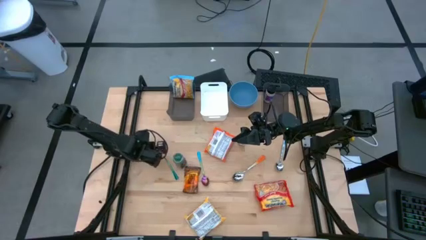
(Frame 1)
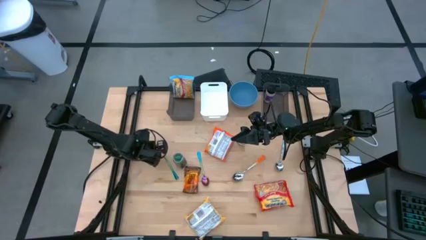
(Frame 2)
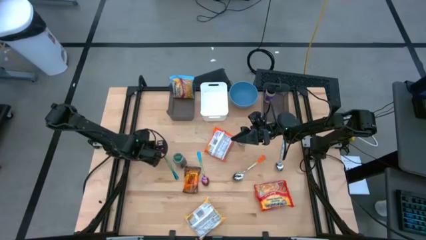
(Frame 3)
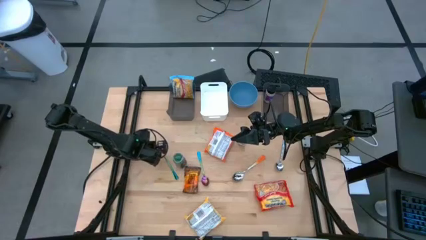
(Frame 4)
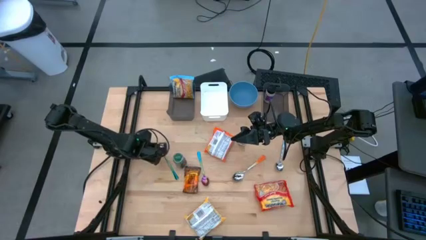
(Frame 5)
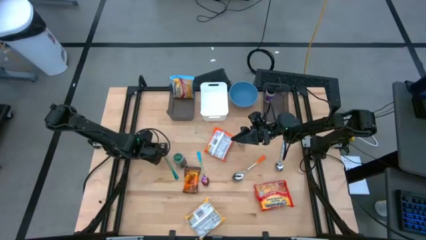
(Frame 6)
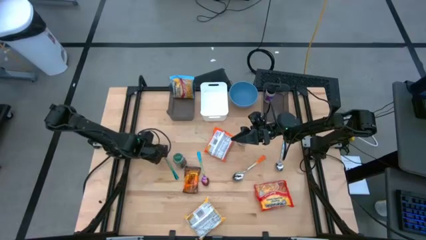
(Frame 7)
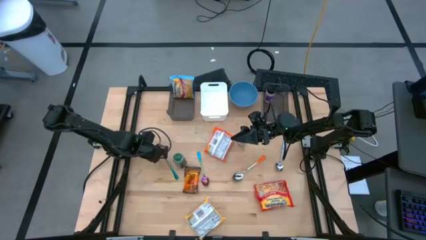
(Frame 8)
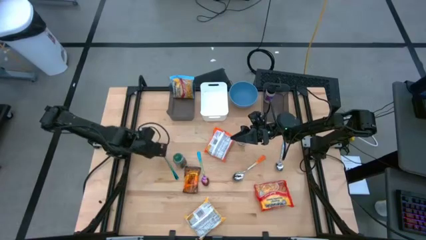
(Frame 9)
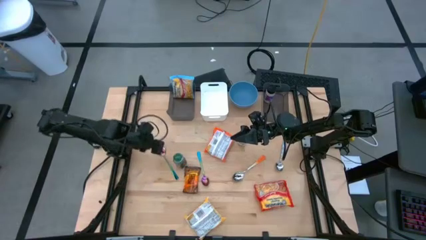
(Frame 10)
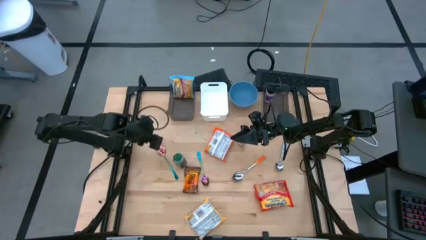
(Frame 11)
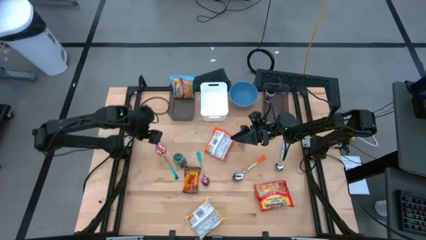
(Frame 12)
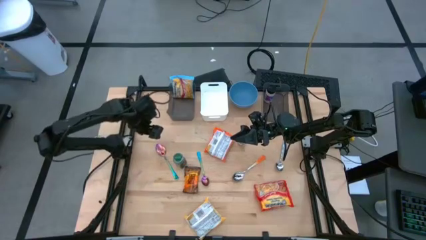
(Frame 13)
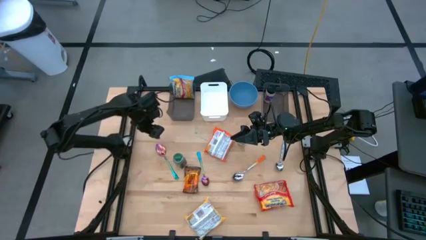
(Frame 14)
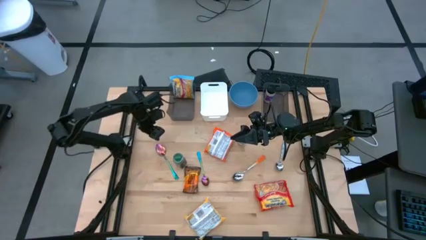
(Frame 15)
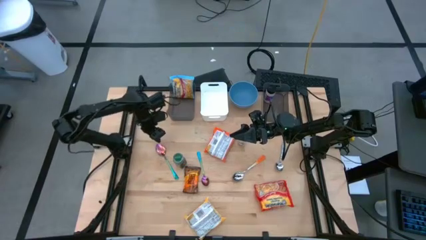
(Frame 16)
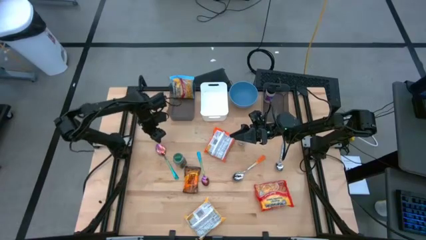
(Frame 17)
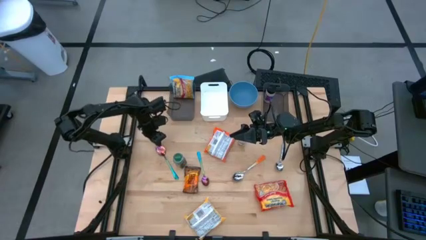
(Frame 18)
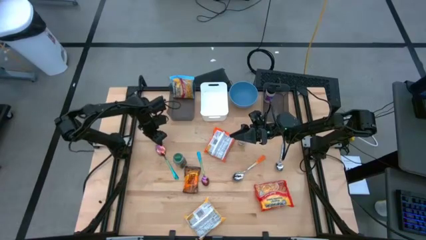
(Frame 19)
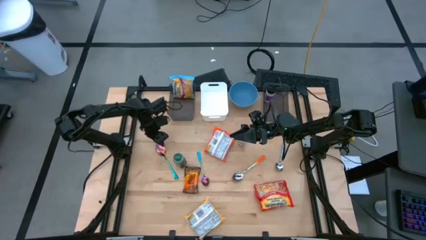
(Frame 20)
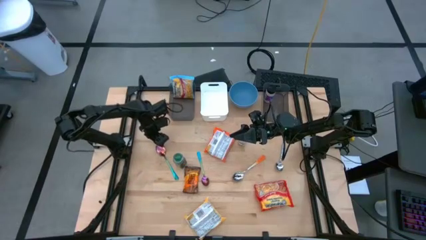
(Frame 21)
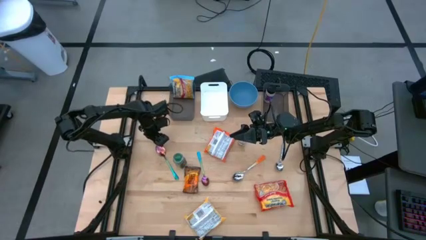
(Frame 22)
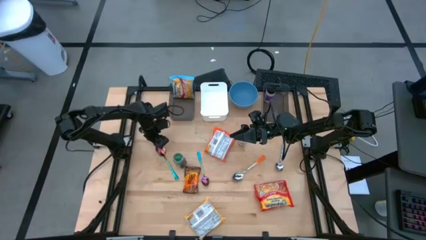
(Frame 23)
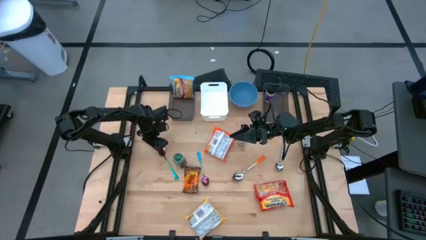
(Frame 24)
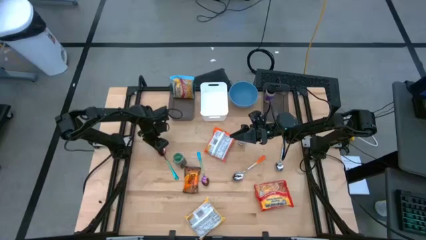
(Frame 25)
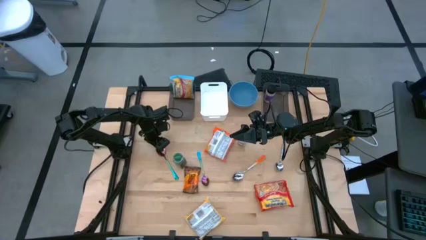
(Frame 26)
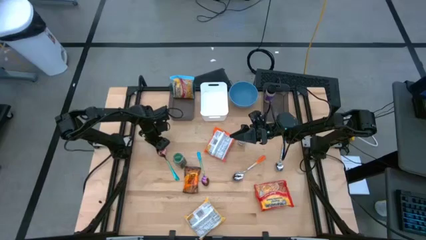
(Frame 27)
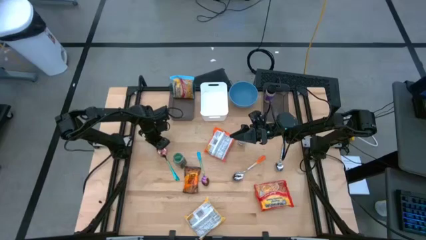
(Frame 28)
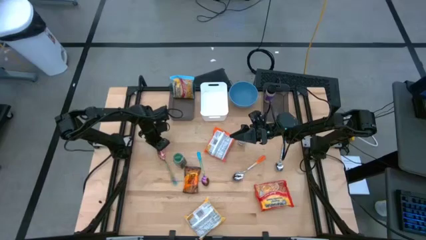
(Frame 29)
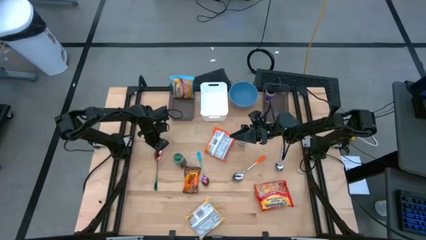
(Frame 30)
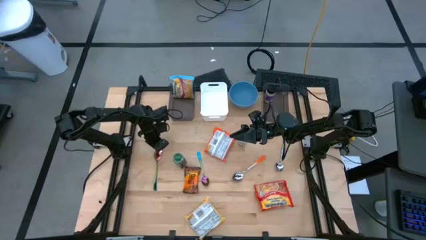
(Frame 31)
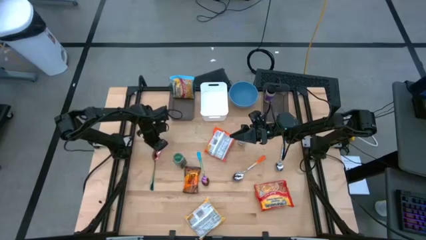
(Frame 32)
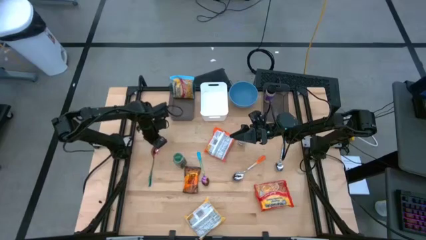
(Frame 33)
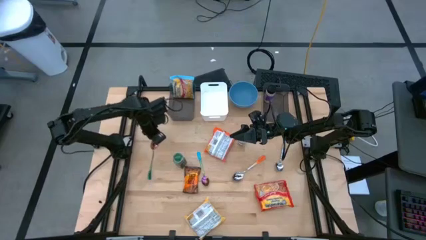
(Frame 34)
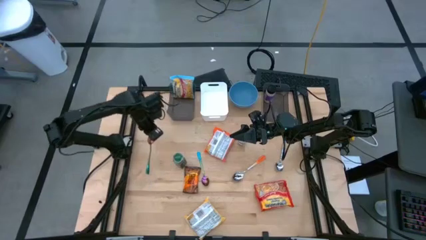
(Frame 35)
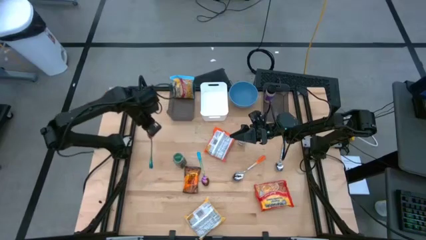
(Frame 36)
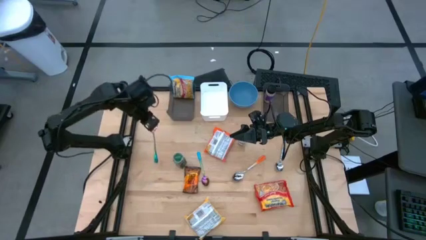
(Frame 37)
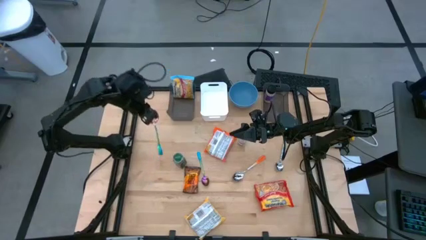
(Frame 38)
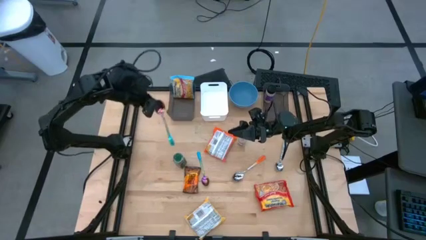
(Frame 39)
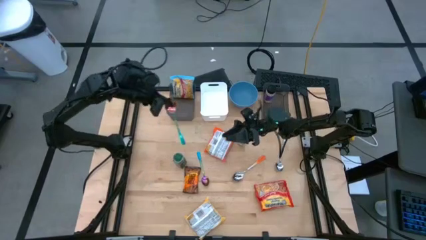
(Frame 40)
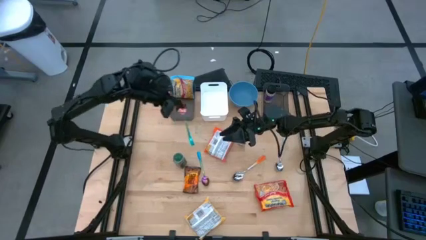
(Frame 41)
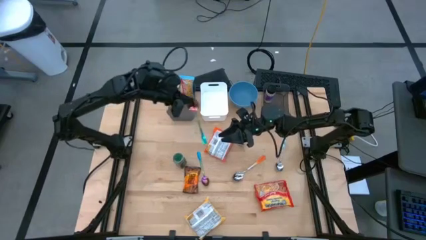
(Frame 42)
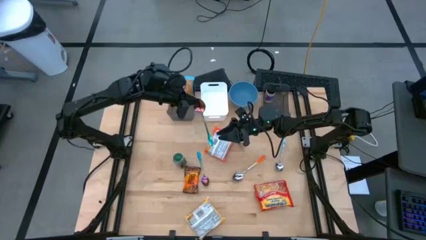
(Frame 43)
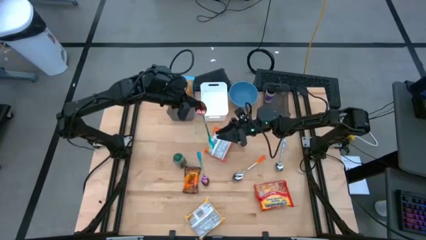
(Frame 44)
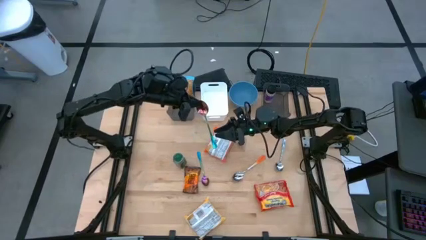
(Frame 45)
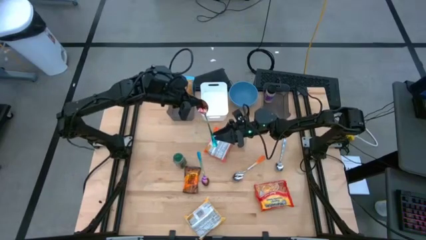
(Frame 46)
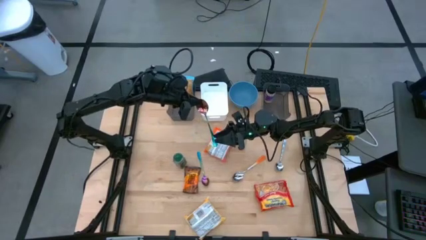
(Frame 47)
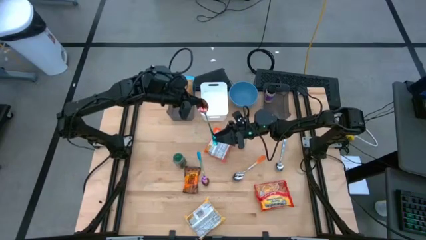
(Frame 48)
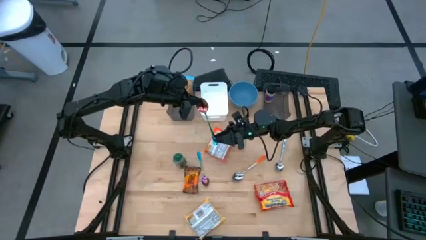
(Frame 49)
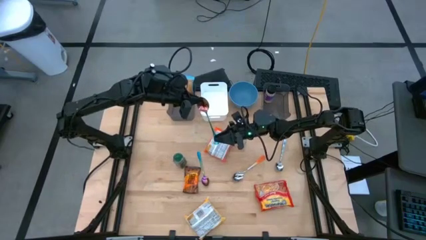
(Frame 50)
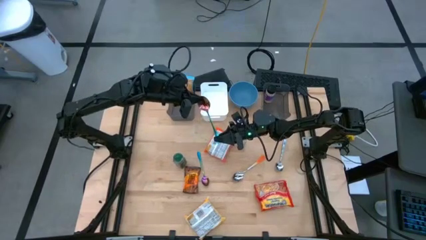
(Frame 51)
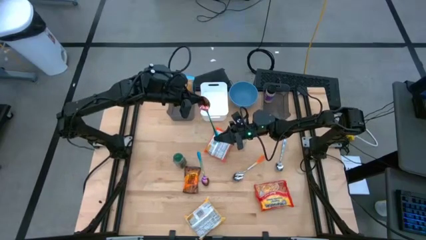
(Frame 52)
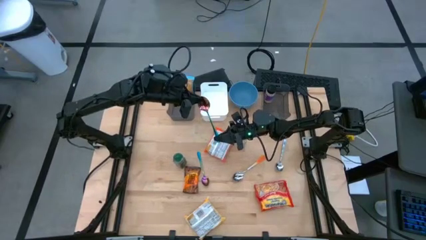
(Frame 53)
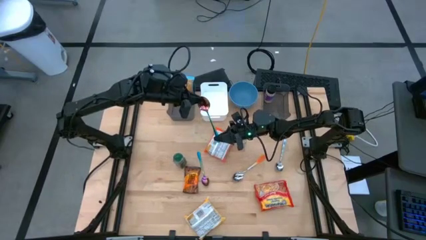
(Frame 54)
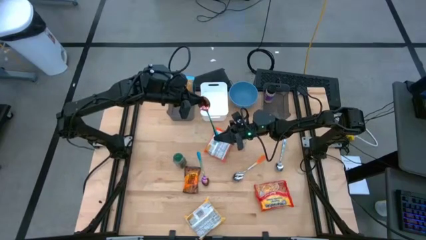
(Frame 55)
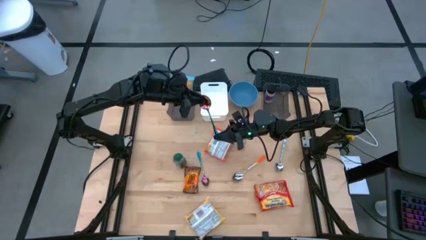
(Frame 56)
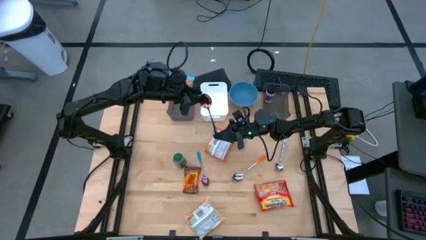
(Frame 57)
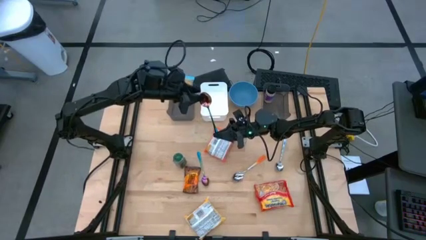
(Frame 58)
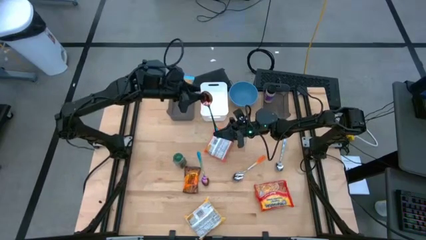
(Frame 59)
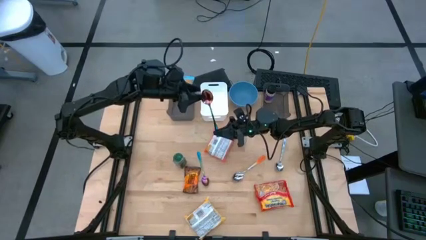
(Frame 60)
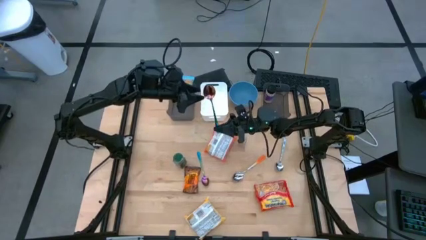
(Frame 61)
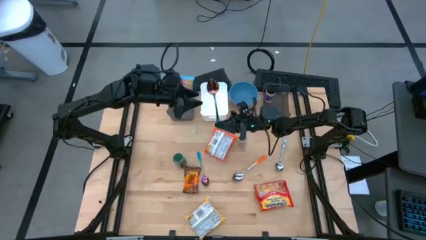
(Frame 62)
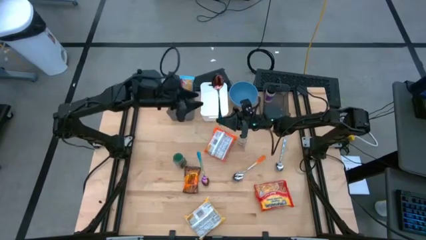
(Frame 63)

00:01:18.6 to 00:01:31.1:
Task: Pick & Place Food Item
Put the left blue spoon into the white bin

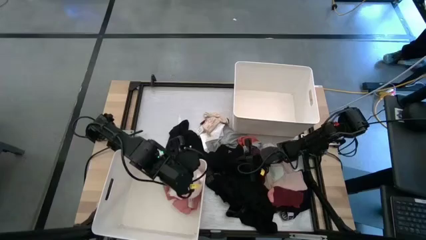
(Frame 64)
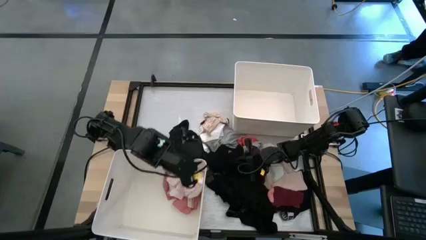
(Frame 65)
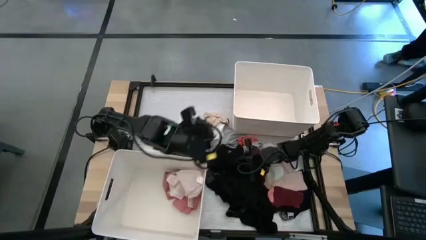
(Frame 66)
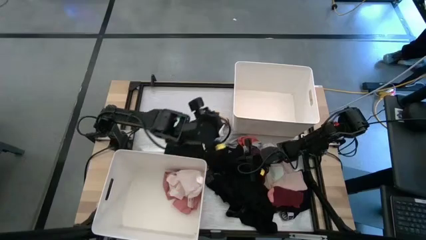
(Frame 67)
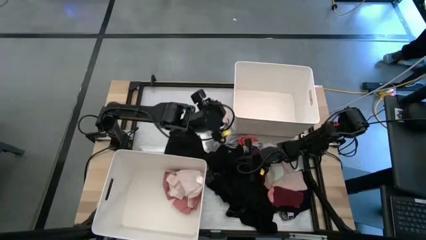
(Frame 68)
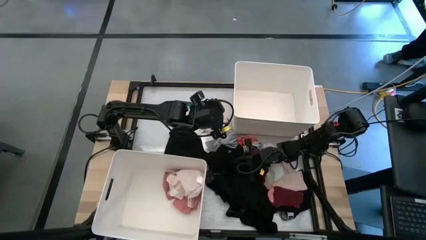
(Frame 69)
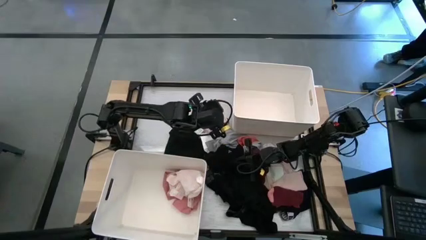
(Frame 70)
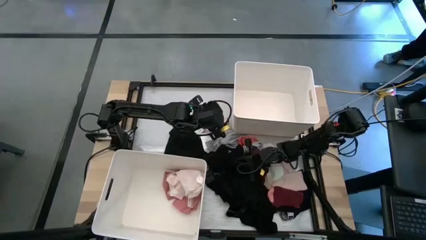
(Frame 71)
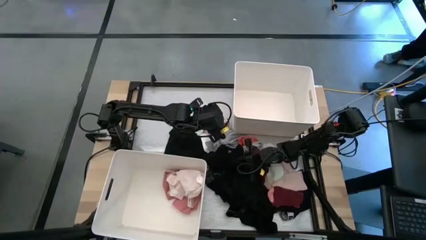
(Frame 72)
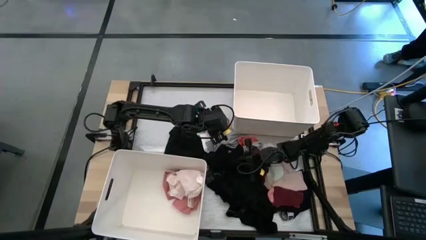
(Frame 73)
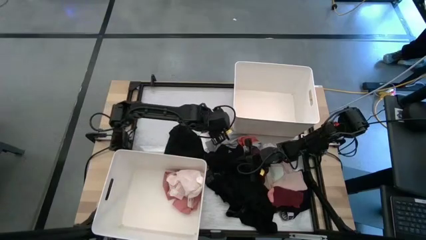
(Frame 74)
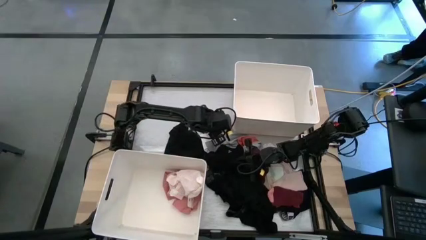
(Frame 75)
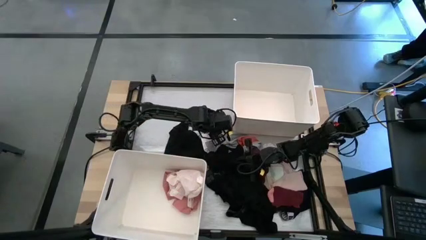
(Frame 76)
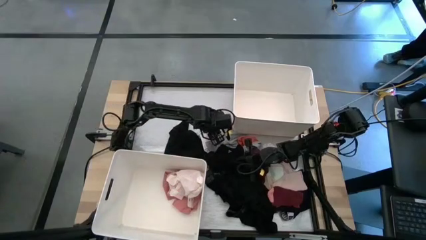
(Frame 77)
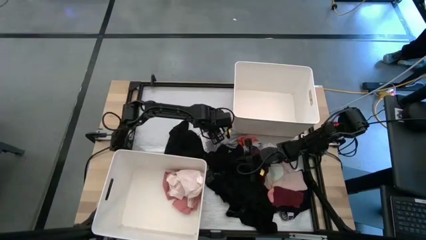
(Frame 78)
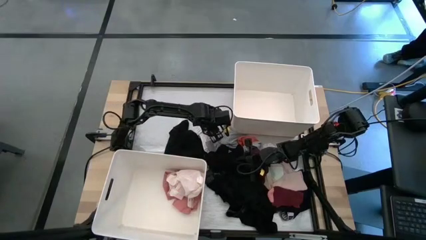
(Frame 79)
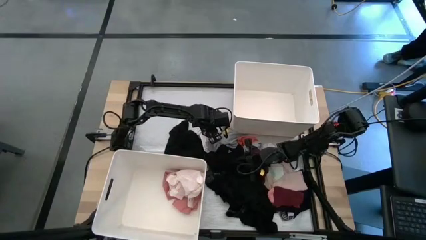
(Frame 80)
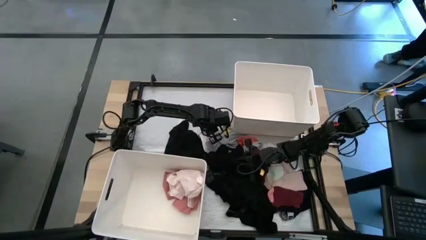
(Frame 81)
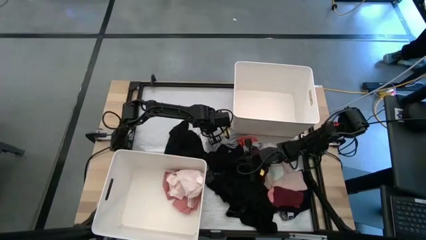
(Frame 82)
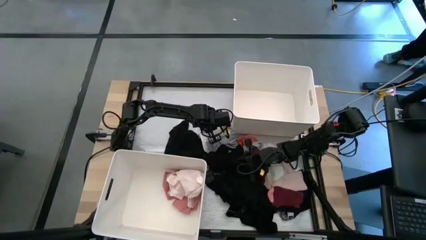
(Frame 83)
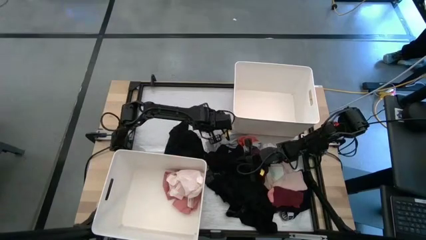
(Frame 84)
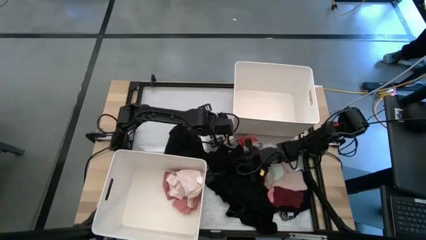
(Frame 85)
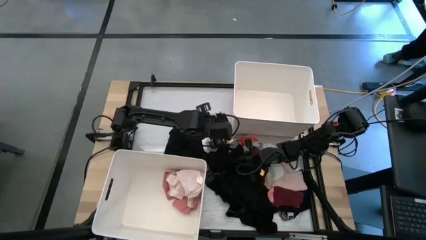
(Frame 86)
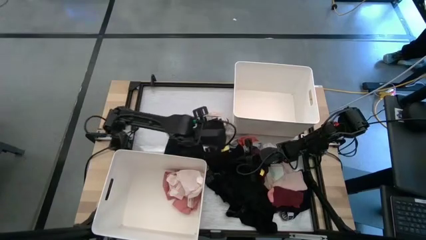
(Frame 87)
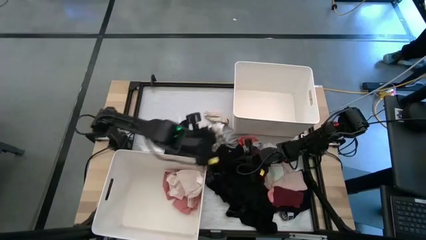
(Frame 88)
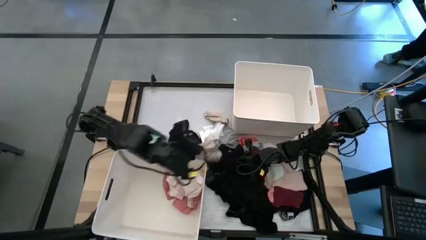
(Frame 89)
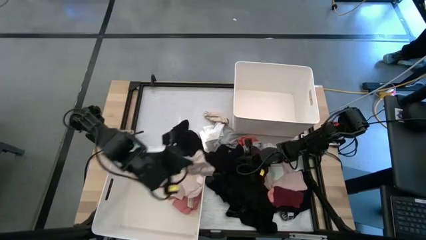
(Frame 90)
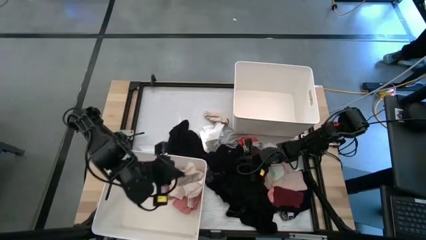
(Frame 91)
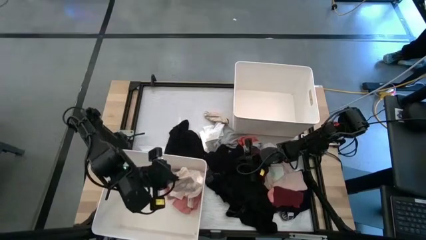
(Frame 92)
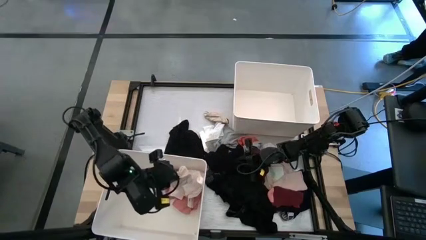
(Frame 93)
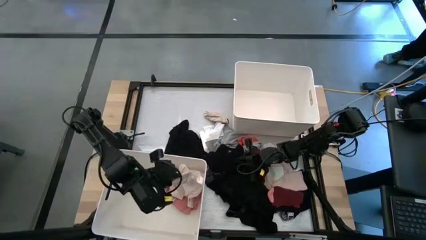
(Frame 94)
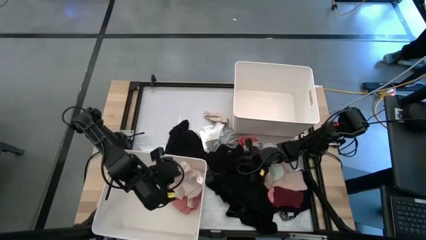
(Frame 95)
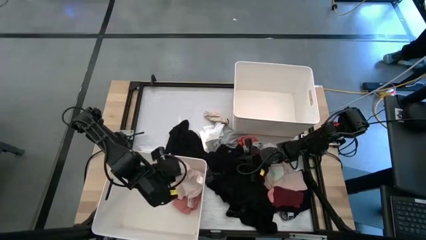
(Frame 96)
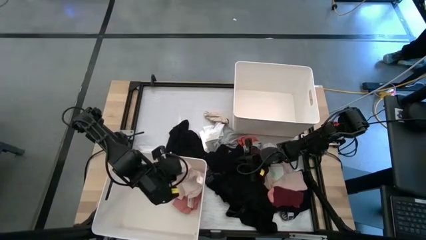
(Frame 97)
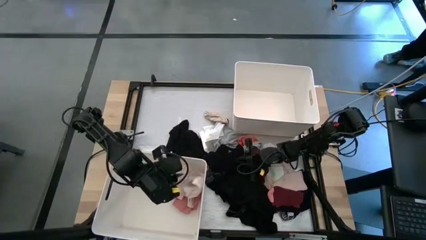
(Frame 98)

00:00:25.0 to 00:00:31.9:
Task: Sort clothes
Put the stripe sock into the bottom white bin
